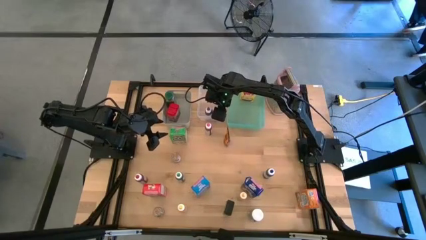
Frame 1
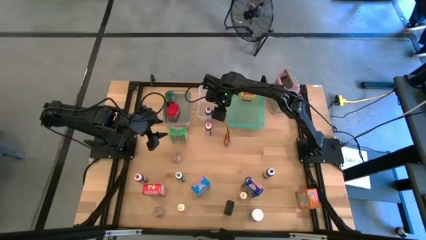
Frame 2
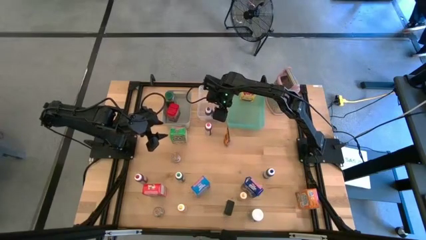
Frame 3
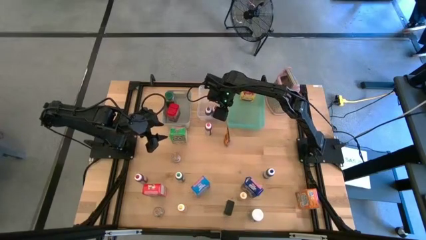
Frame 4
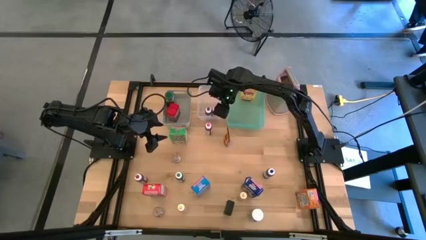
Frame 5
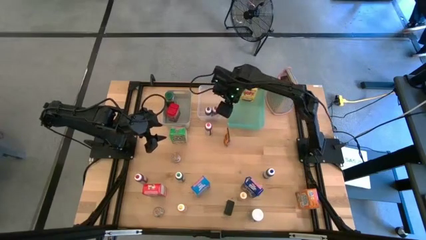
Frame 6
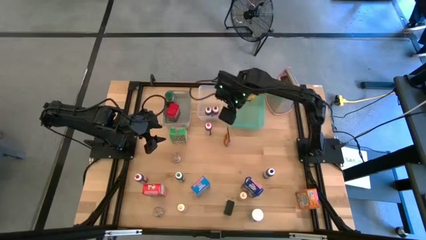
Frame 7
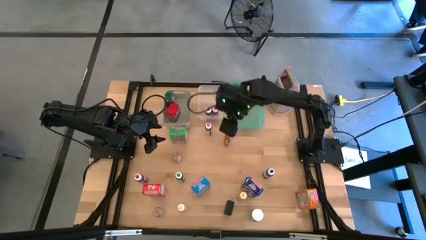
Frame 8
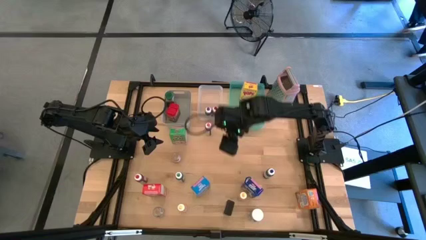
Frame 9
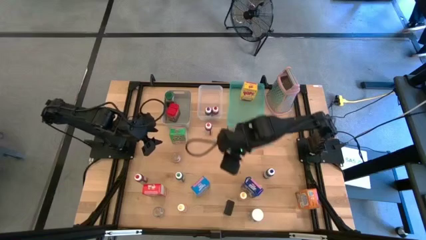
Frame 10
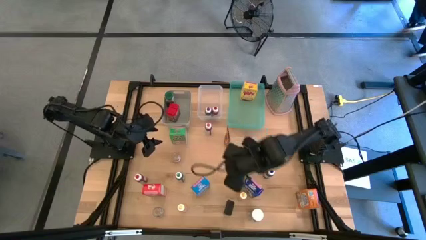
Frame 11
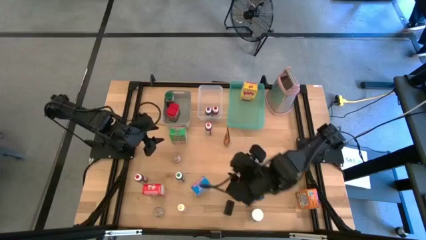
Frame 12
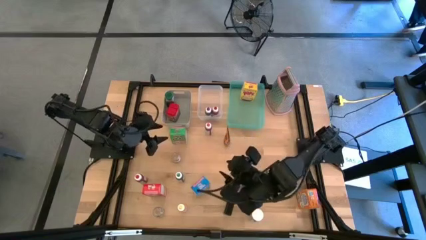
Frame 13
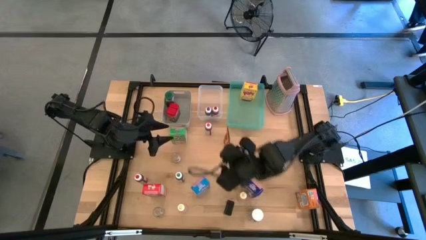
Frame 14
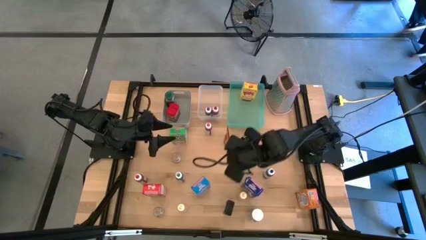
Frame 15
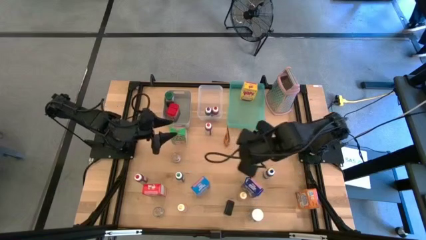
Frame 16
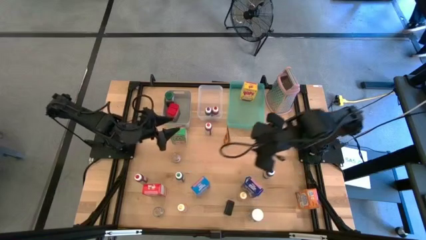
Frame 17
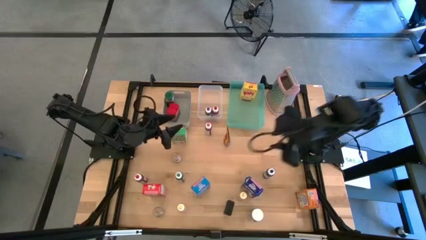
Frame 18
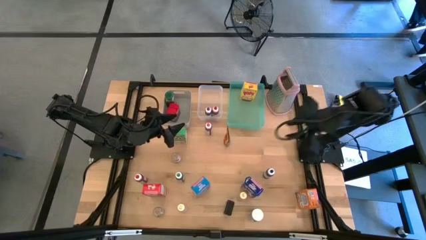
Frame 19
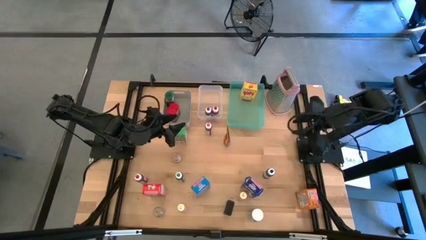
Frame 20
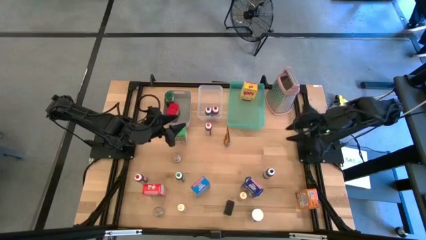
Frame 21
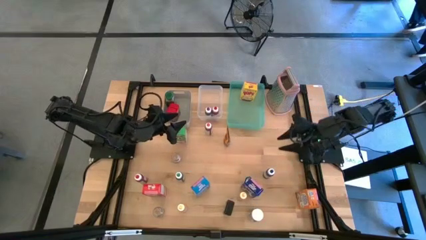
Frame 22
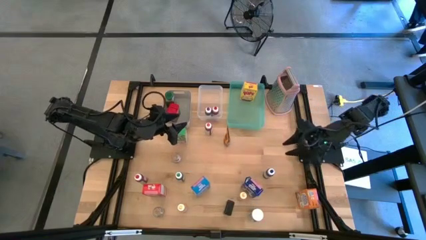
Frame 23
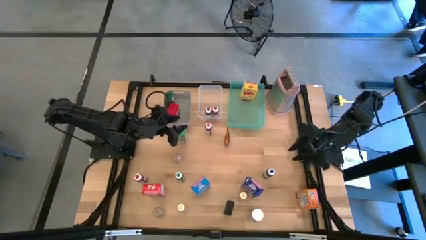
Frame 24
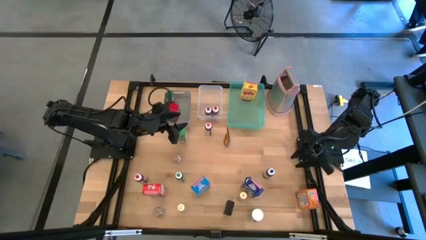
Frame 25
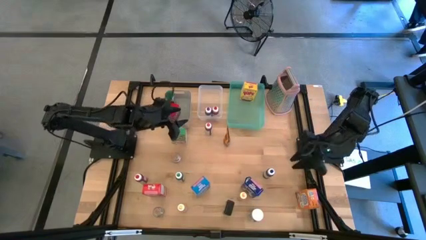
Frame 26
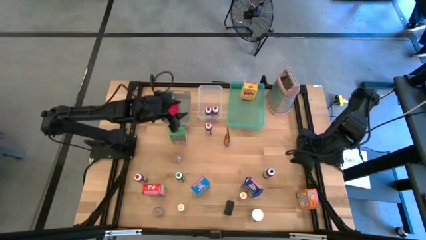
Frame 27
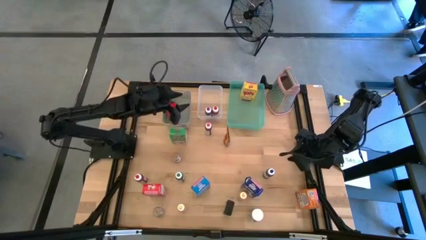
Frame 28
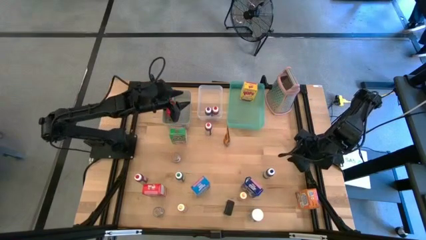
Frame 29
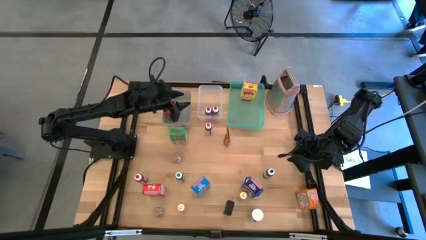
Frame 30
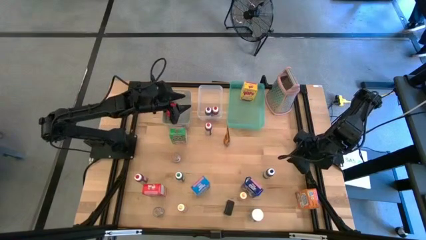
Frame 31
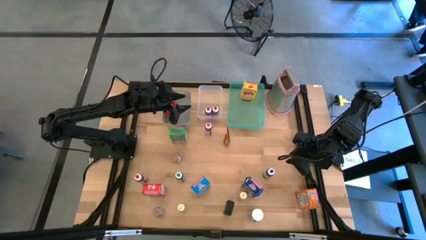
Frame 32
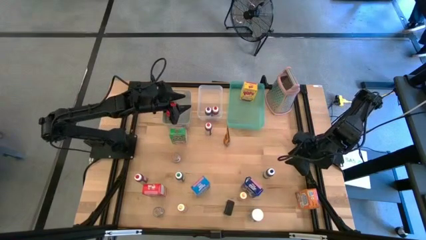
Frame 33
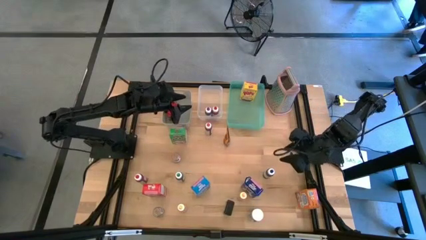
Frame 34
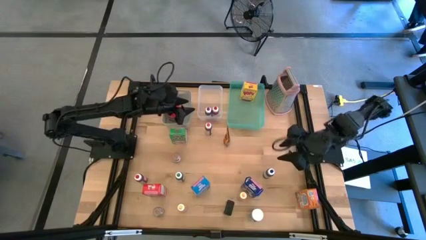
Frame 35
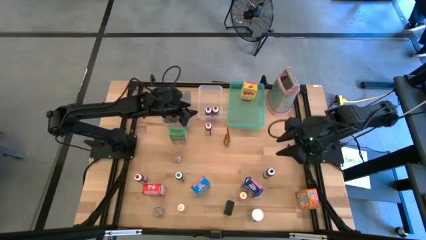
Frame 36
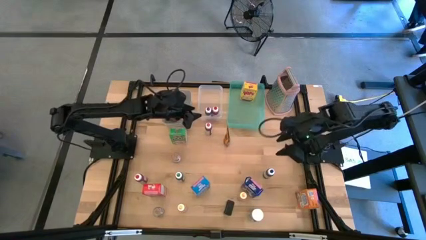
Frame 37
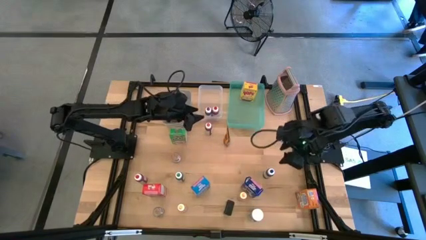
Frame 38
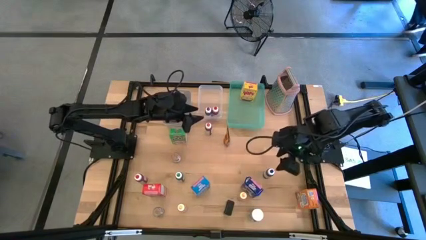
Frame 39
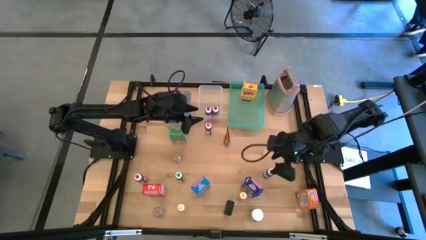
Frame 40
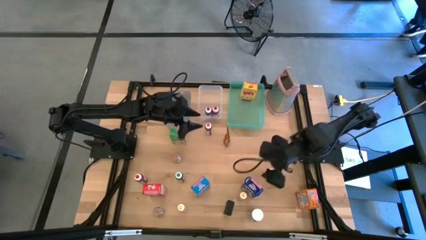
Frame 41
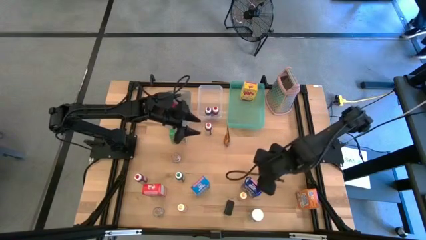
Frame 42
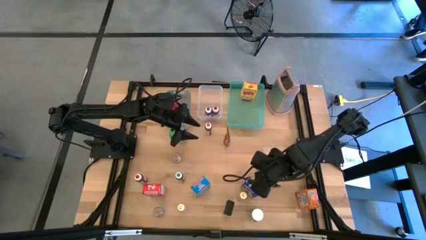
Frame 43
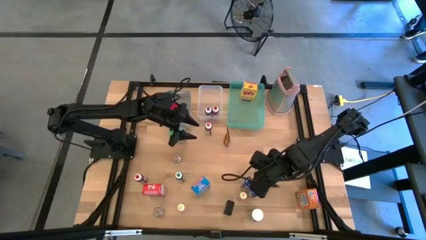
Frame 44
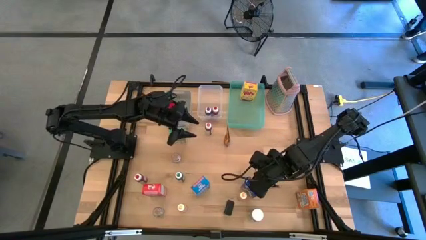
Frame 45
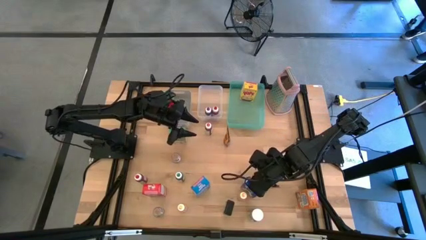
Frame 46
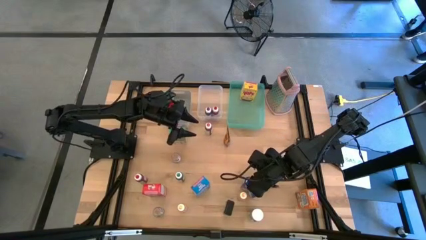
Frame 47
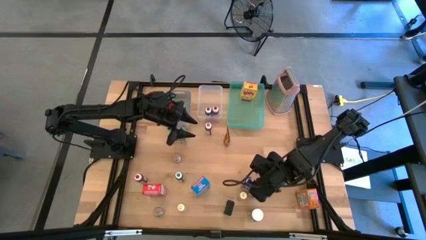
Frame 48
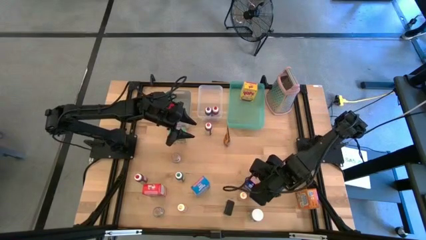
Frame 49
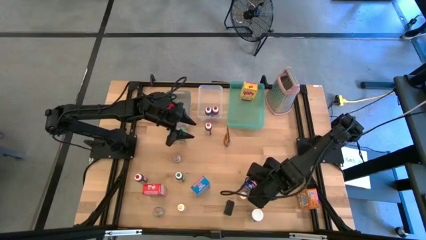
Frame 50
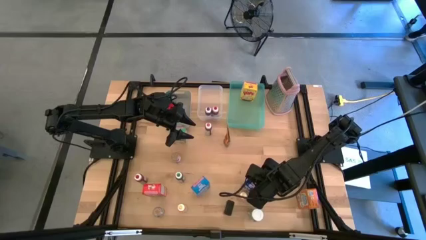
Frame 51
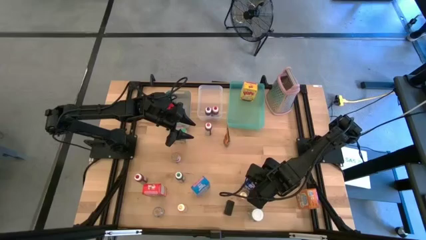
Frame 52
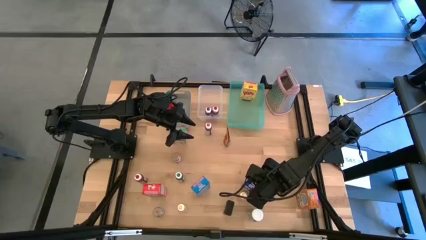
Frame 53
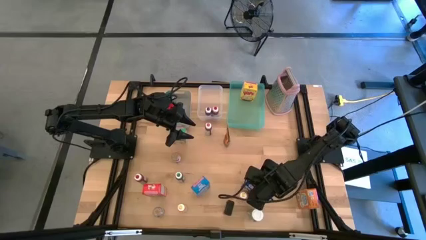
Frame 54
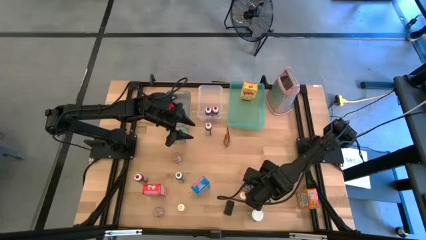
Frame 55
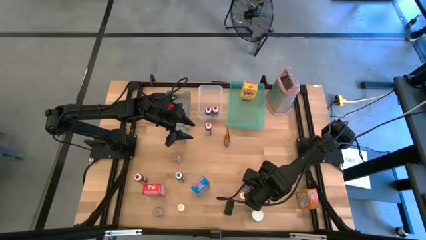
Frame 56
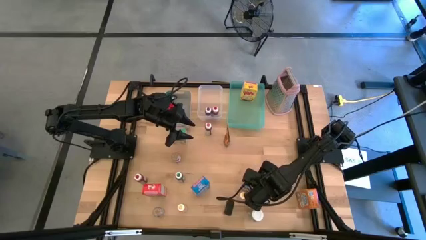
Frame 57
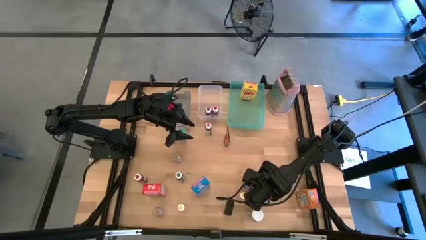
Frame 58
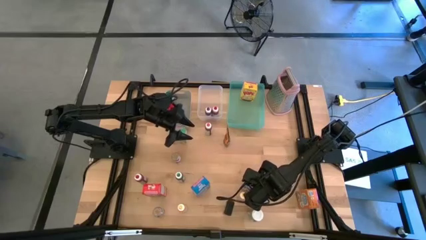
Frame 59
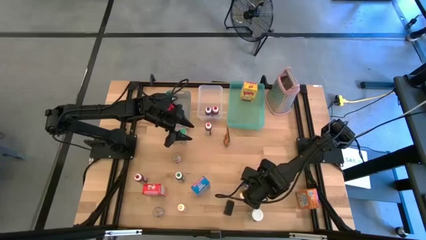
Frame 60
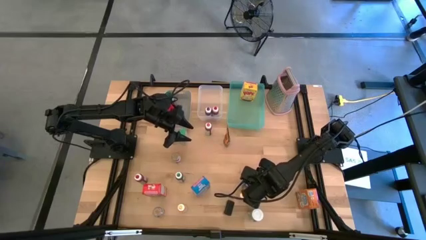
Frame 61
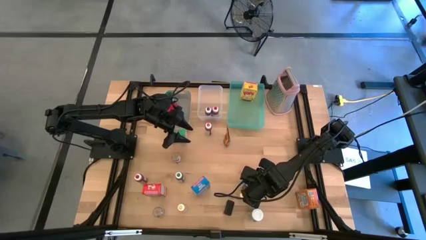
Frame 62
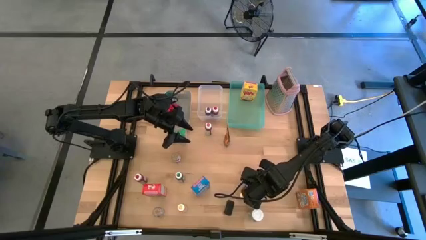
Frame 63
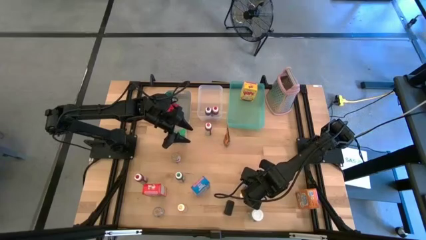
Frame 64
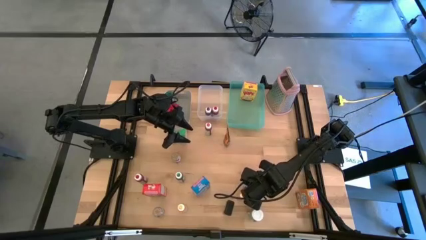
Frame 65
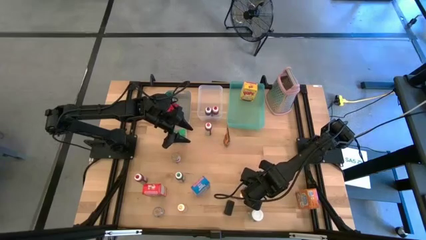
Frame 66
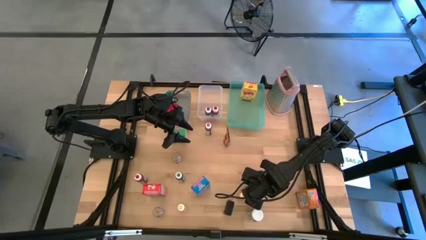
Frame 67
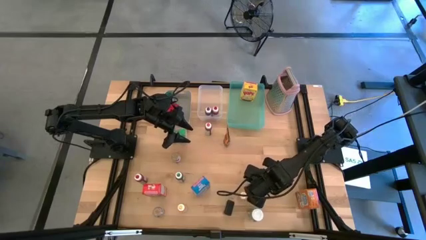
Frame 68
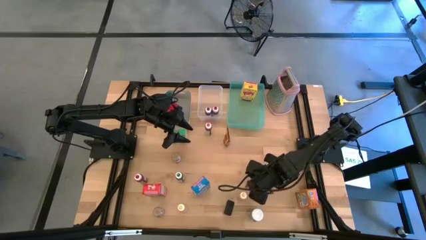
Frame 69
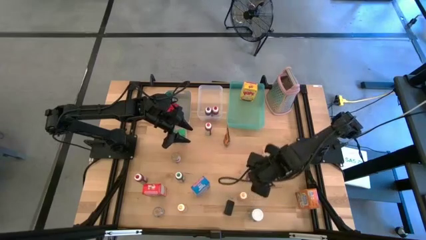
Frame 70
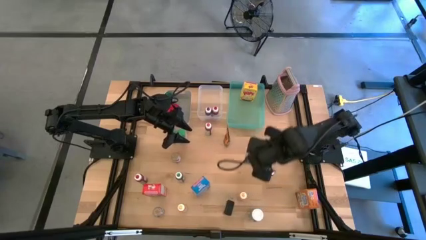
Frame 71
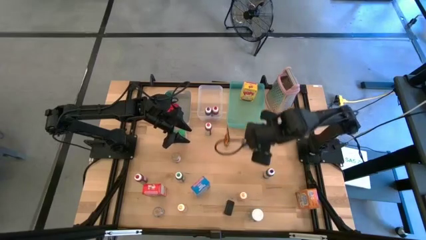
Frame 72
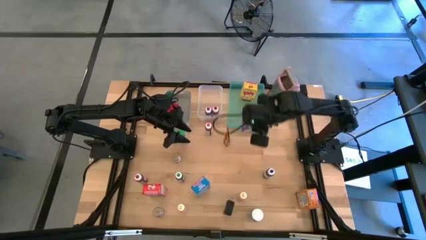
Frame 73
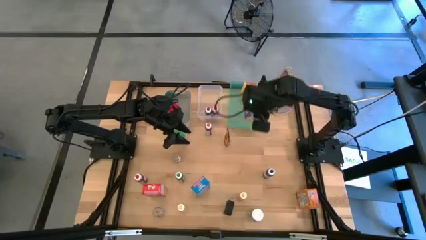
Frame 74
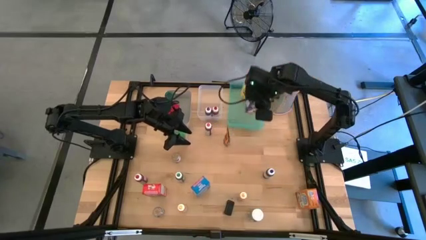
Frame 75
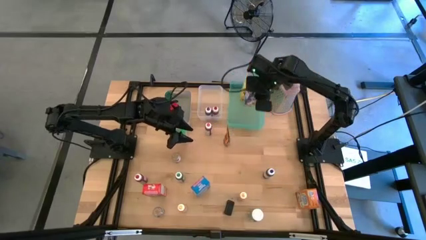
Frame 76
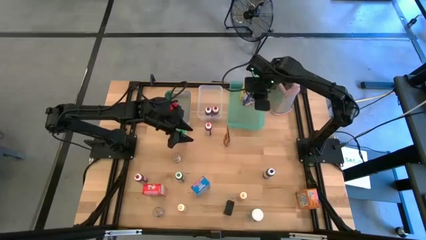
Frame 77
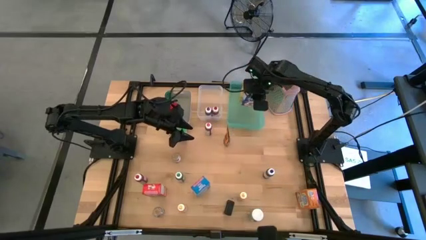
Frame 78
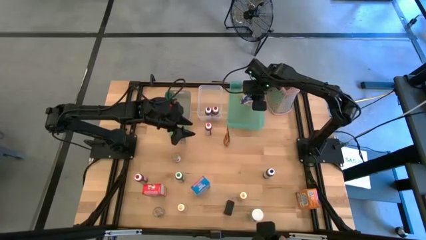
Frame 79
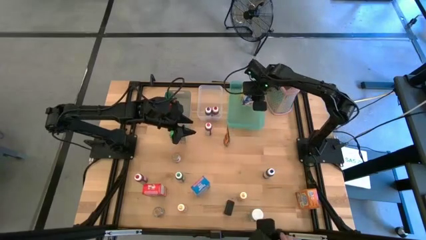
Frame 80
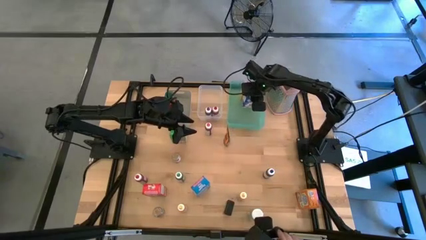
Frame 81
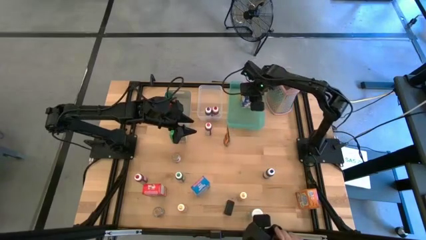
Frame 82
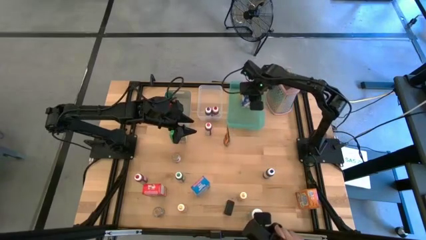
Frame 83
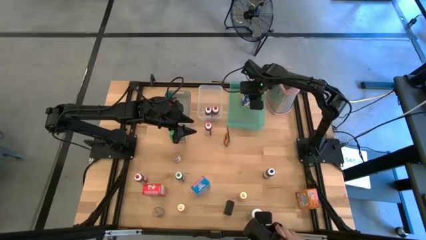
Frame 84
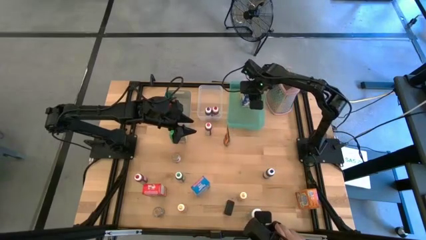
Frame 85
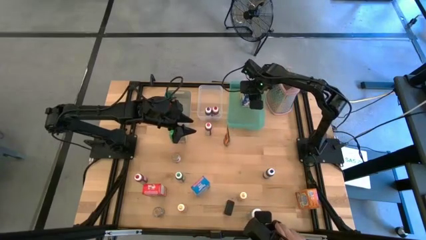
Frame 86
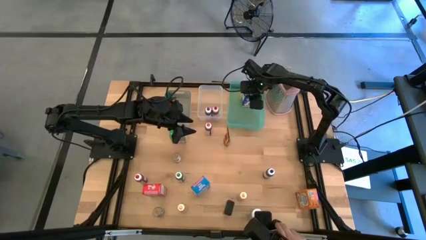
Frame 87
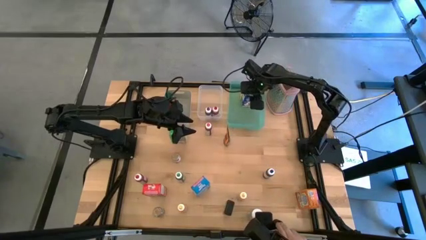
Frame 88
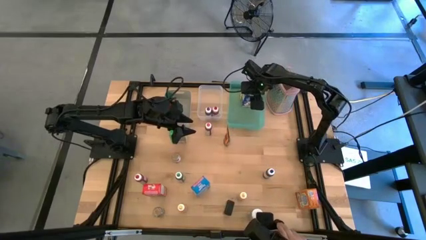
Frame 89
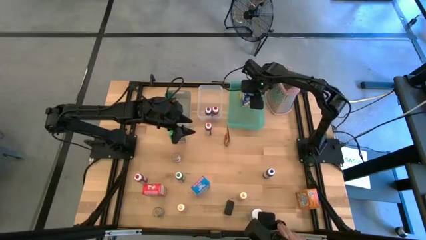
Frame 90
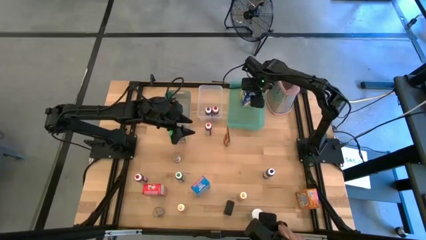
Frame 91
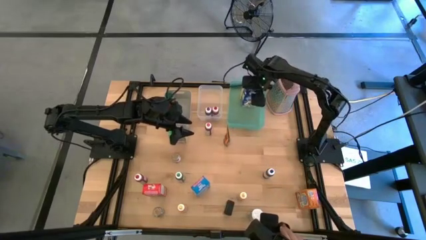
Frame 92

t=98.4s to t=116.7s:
Task: Pick & Place Kitchen Items
Put the blue cereal box into the green bin
